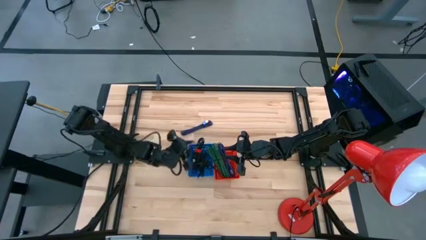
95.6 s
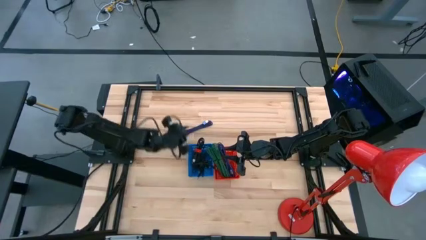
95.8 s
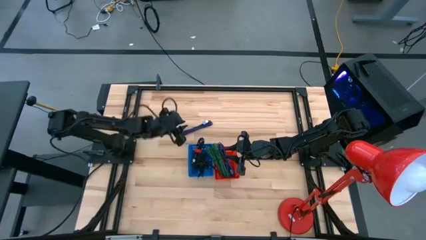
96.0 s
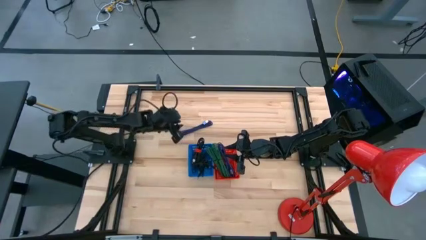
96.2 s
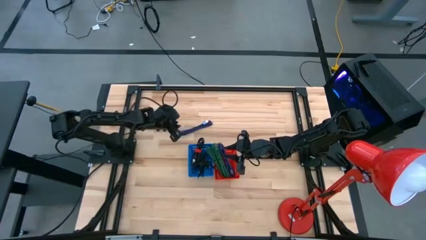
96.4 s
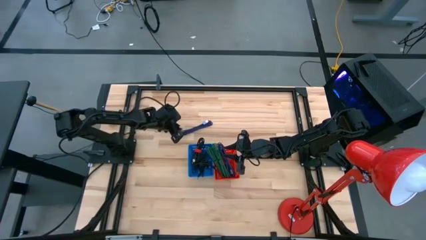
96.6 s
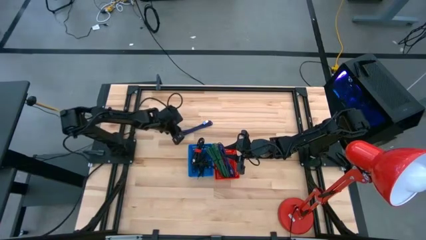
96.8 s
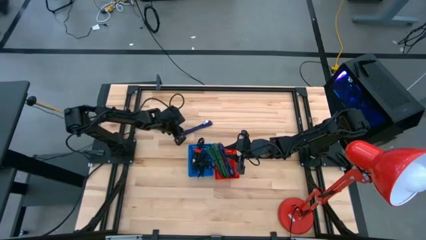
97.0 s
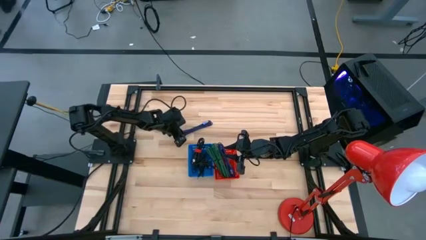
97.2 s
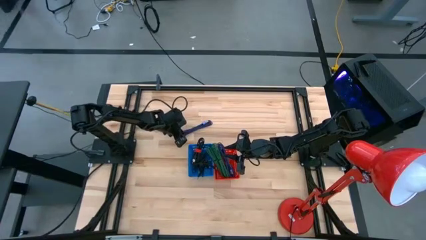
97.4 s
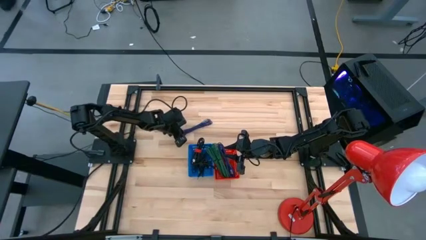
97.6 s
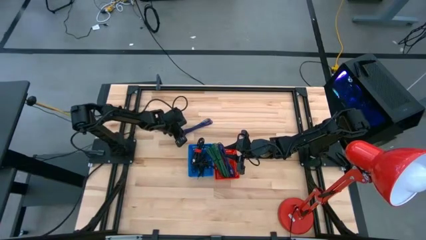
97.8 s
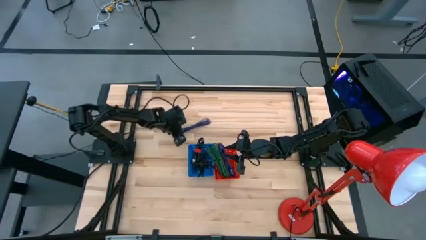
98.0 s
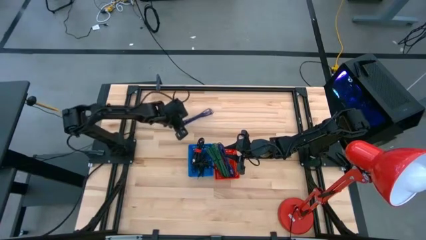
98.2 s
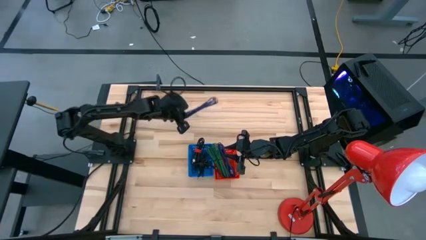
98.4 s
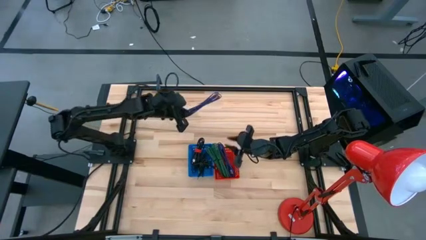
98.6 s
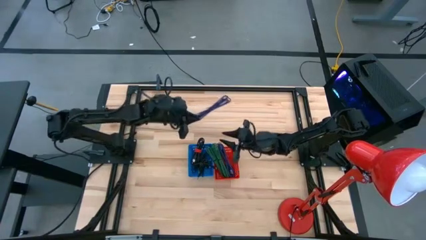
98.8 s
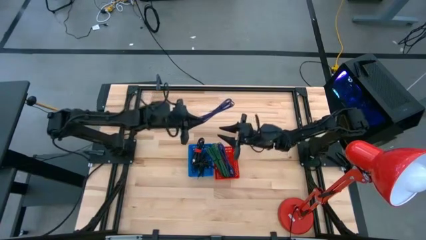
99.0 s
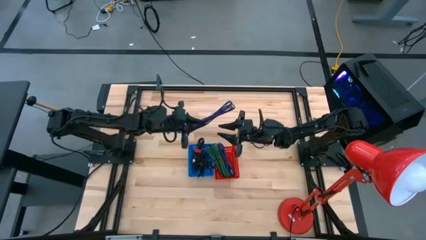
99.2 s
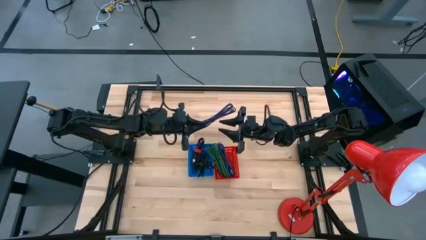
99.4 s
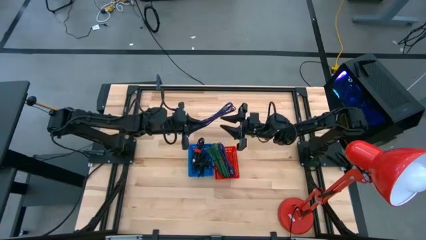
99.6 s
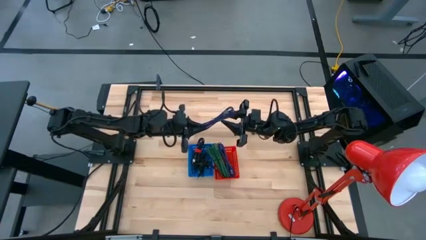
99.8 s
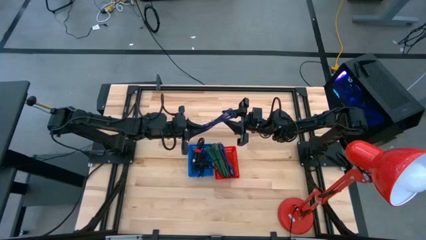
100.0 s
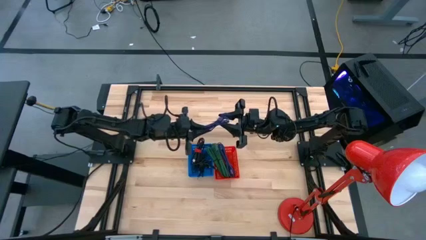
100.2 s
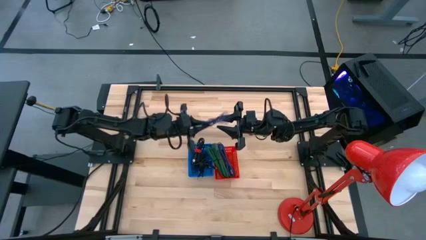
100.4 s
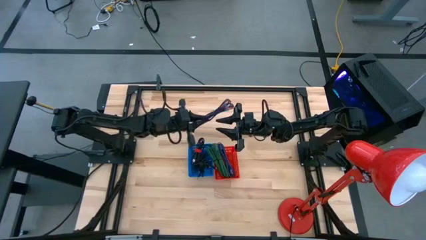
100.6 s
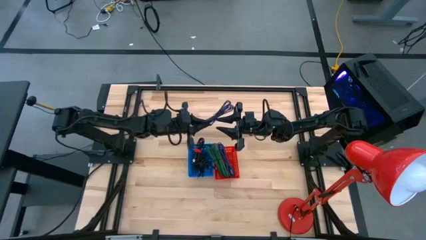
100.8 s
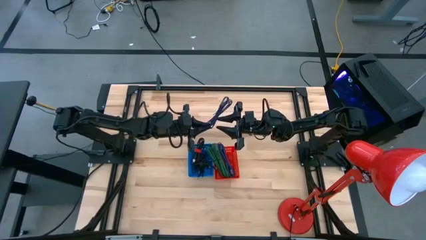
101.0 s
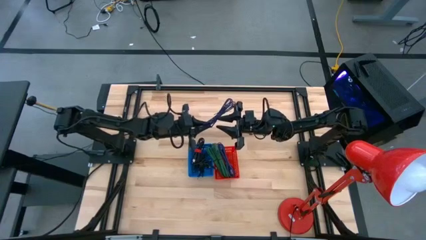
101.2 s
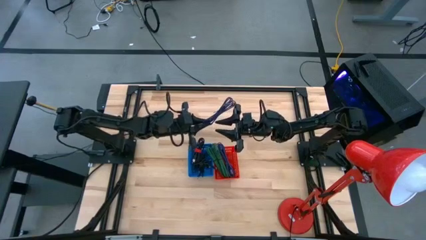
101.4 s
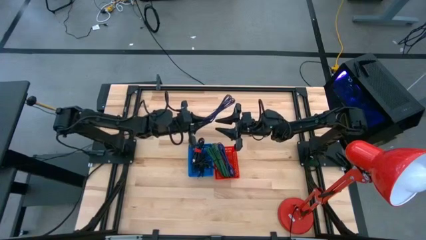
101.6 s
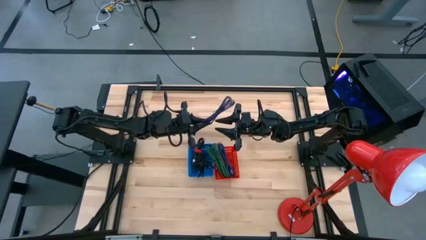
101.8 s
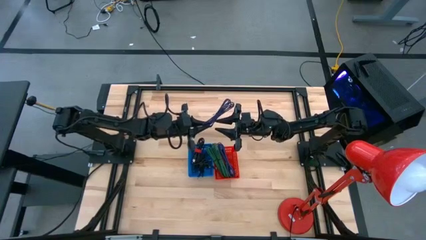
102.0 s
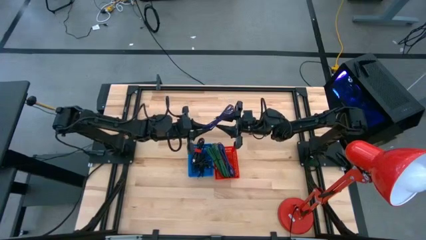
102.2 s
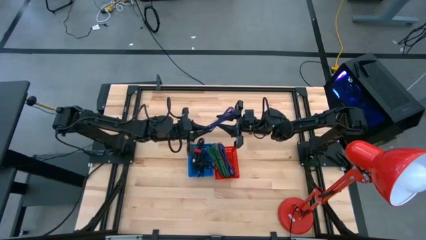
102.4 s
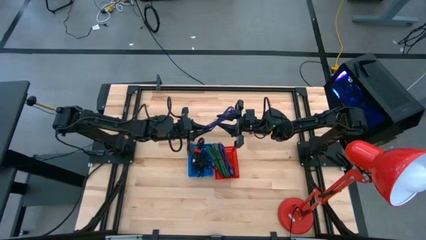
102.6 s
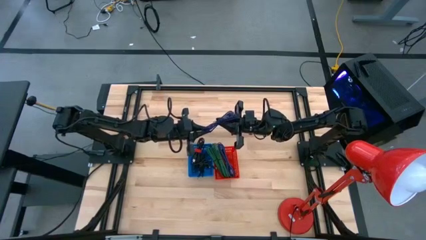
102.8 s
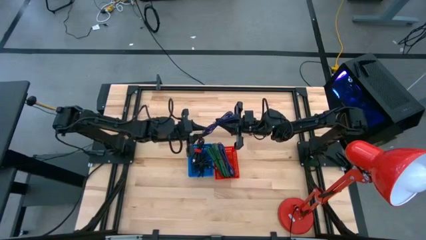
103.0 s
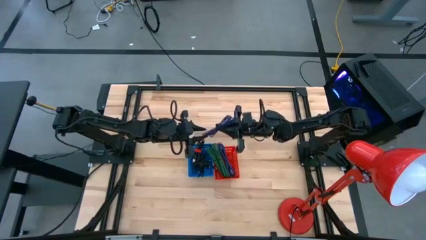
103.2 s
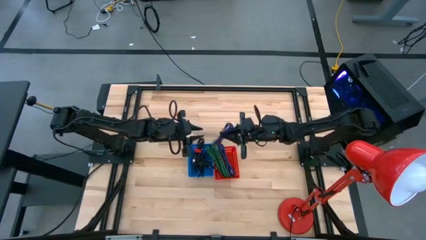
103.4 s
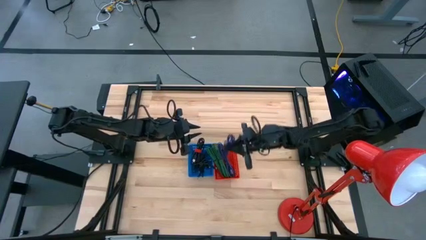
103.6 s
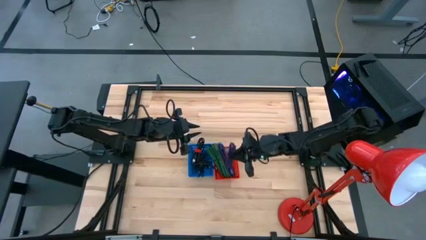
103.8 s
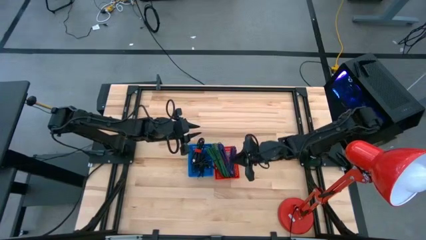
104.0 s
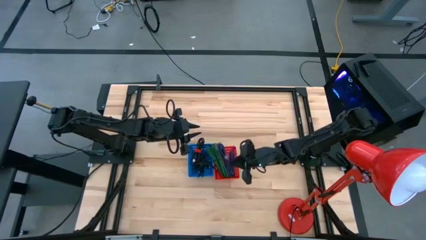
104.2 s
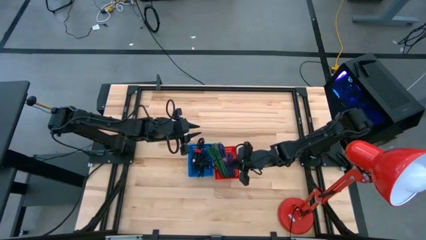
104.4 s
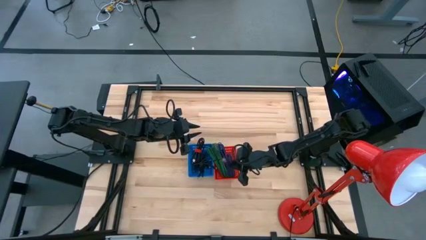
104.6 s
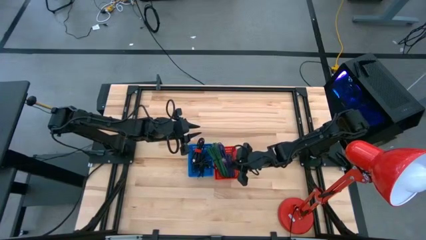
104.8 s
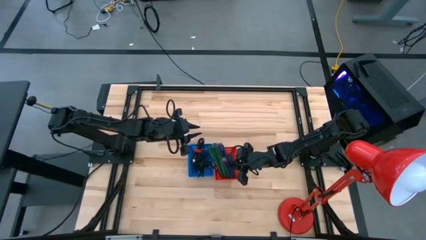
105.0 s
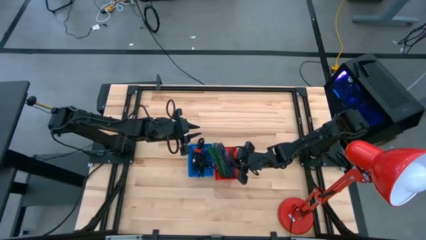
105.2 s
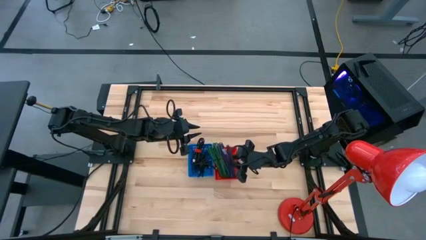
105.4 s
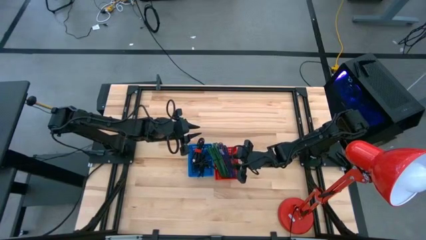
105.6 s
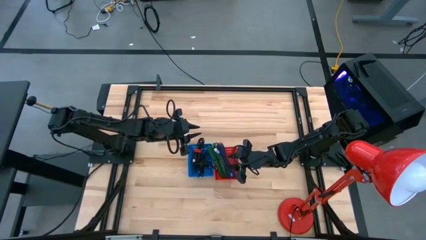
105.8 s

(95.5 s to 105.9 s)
Task: Pick & Place USB Port
Put the black and blue USB cable into the red basket

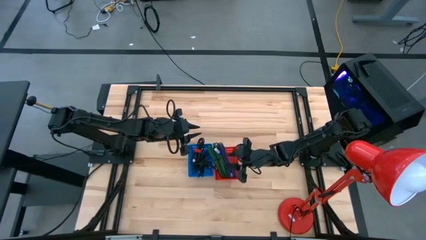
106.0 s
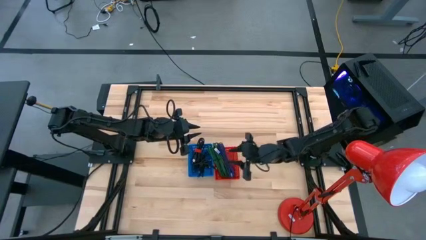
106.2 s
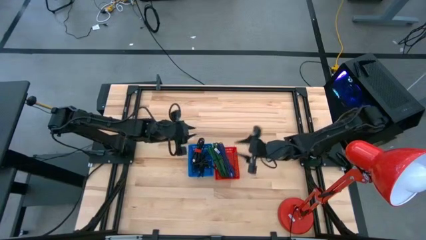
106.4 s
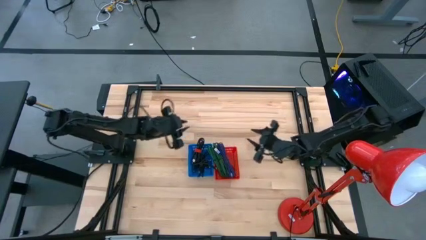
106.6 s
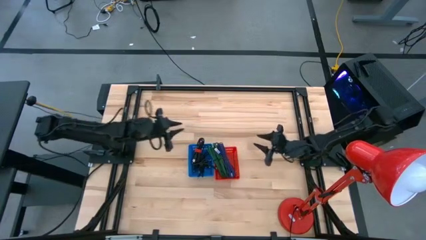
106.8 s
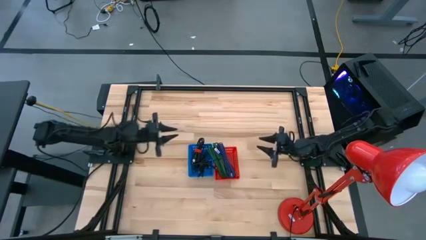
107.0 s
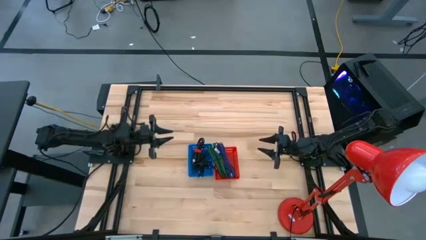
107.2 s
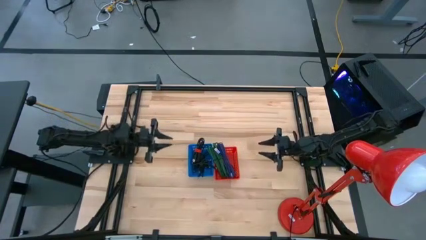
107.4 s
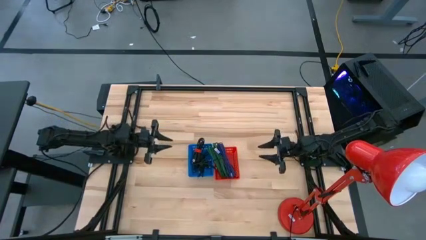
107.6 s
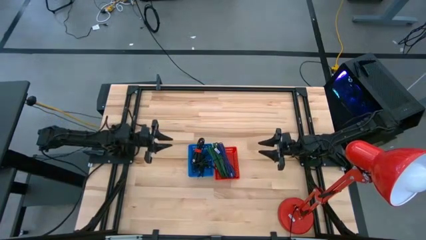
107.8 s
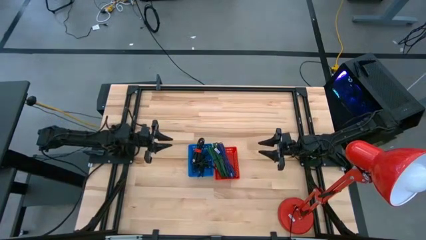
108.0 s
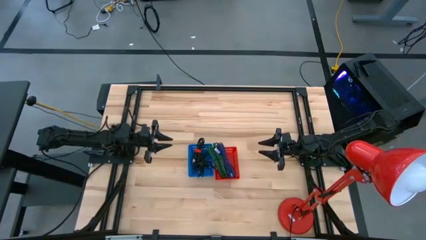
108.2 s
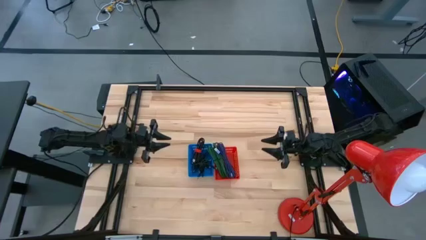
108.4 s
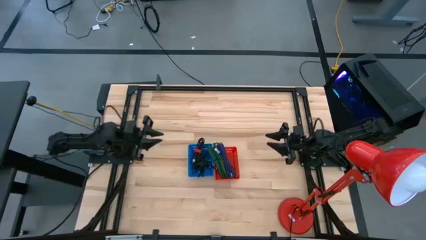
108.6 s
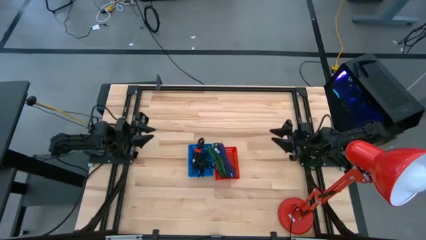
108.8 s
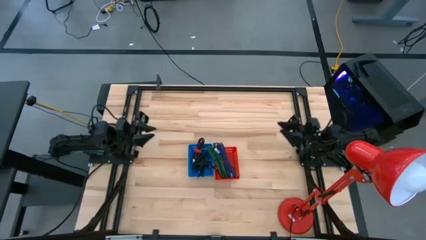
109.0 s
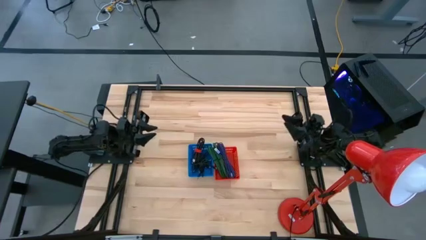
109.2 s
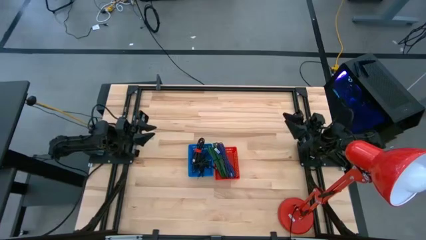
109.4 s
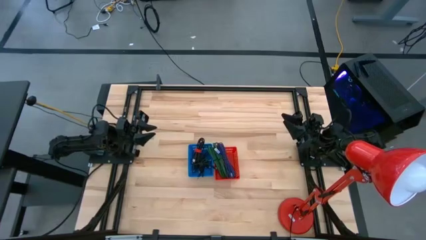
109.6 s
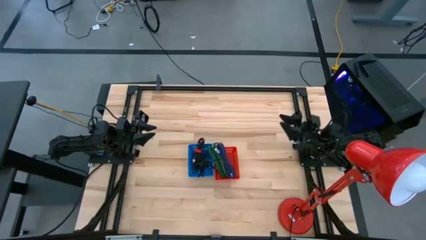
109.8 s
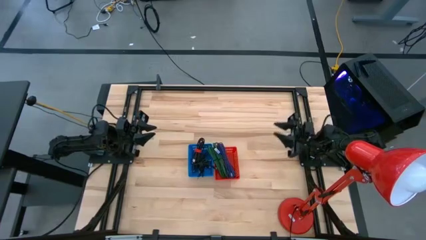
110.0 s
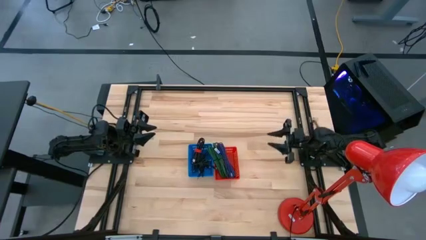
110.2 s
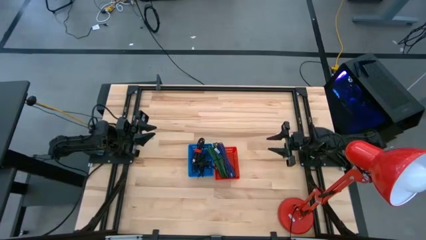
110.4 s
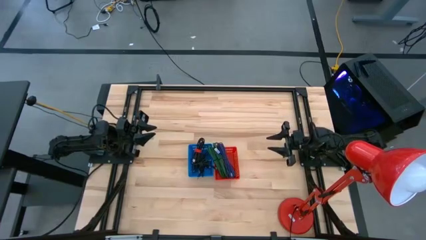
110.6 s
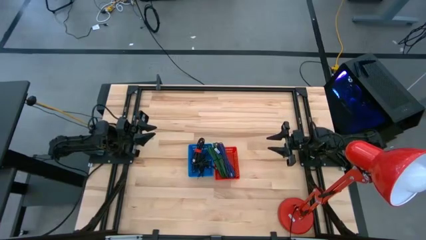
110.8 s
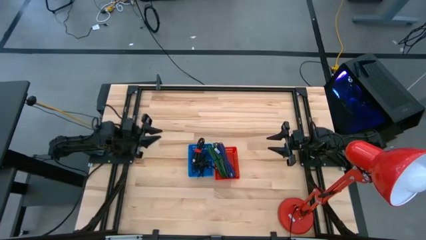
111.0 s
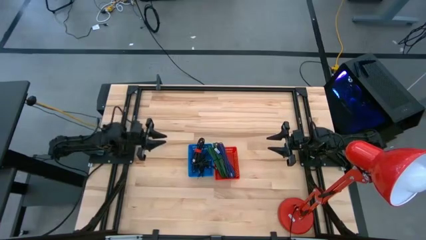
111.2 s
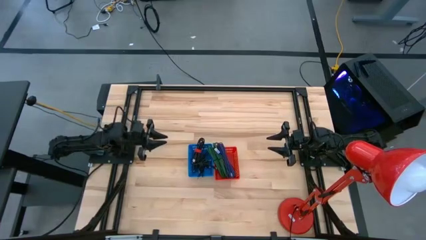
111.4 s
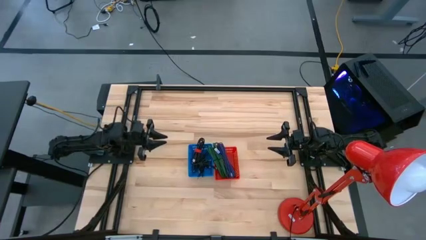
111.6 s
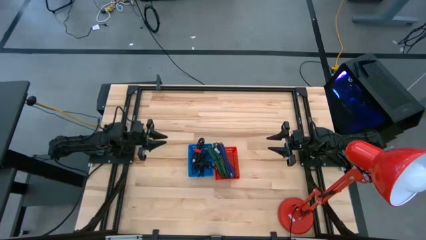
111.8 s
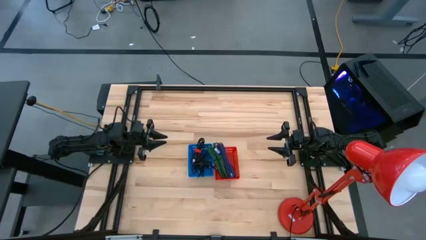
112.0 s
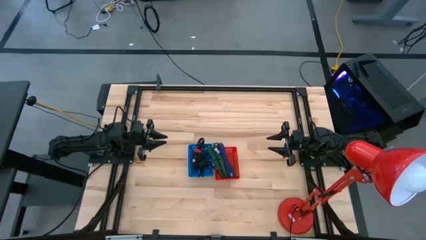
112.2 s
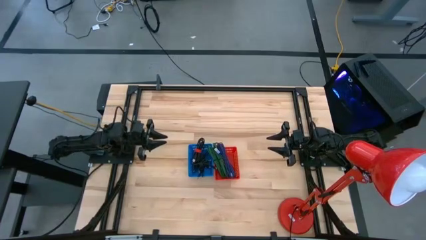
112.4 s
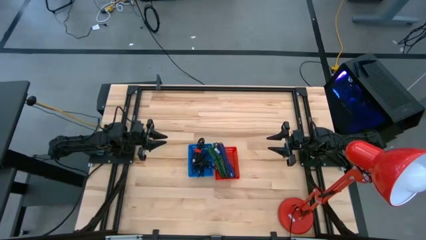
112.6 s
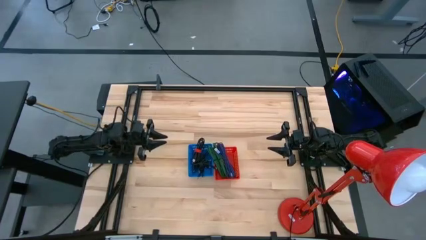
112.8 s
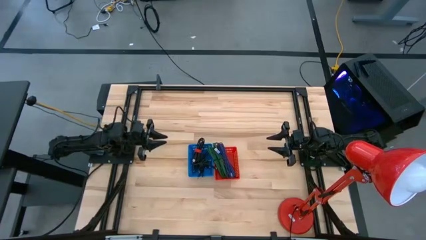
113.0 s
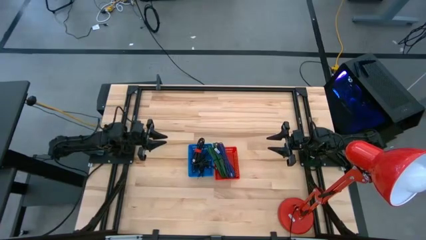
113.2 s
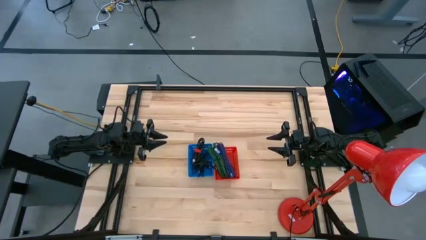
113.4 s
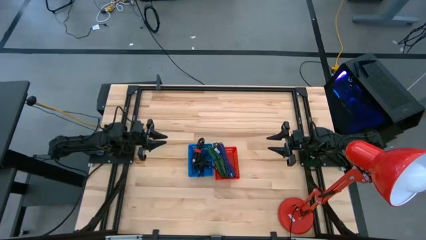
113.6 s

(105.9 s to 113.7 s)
Return to Home Position
